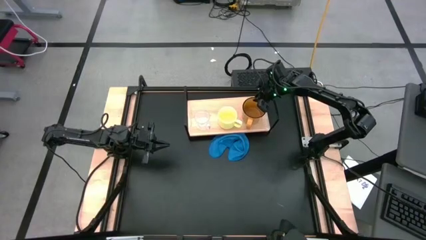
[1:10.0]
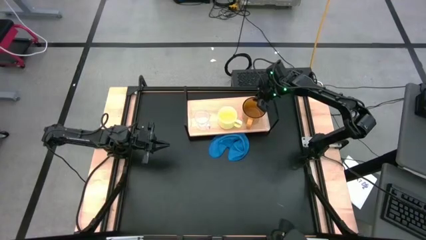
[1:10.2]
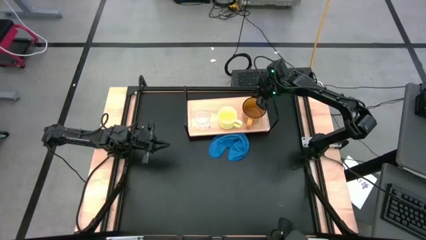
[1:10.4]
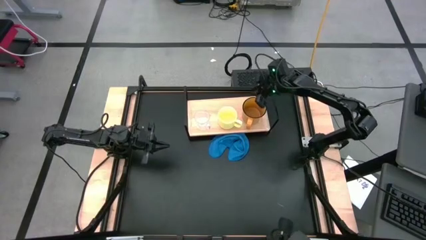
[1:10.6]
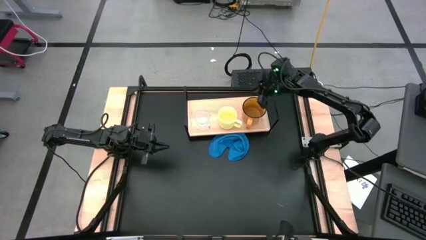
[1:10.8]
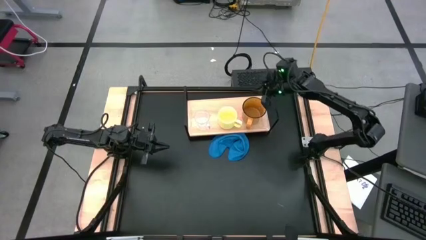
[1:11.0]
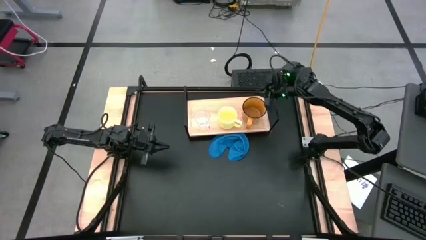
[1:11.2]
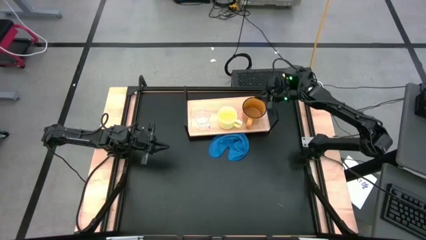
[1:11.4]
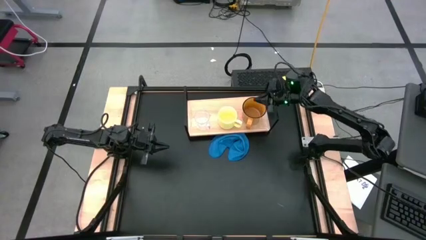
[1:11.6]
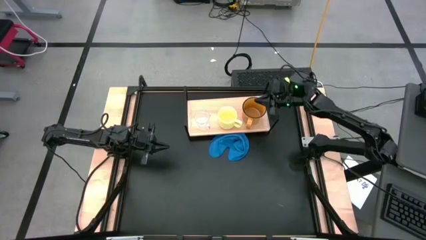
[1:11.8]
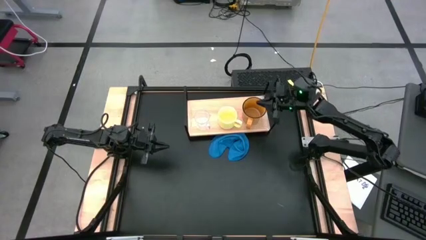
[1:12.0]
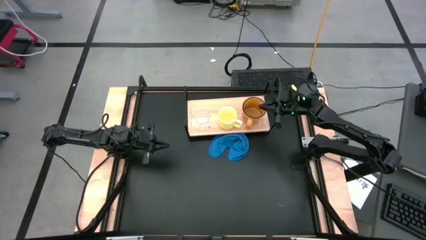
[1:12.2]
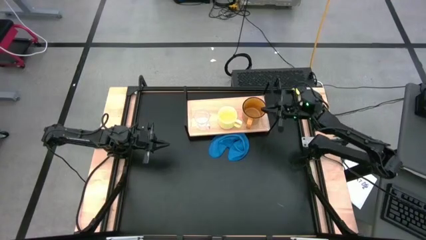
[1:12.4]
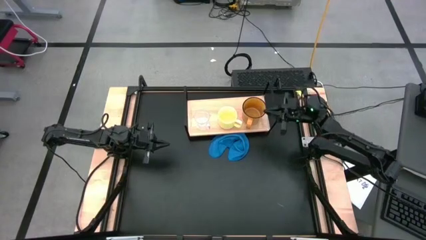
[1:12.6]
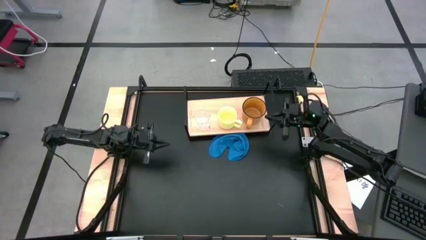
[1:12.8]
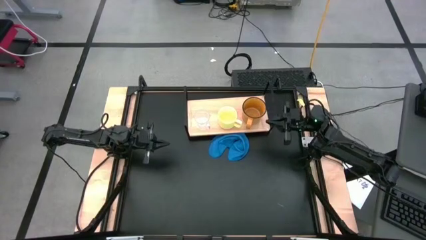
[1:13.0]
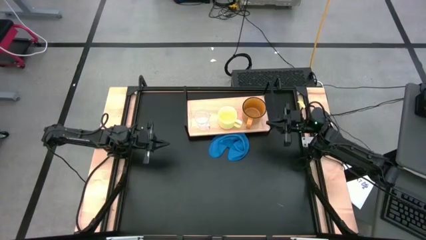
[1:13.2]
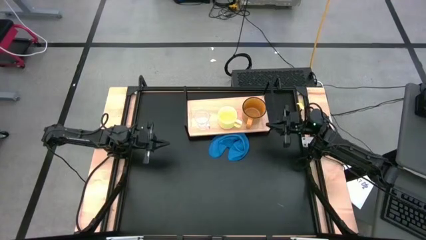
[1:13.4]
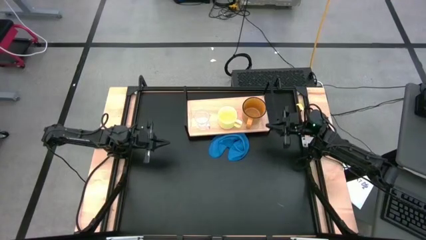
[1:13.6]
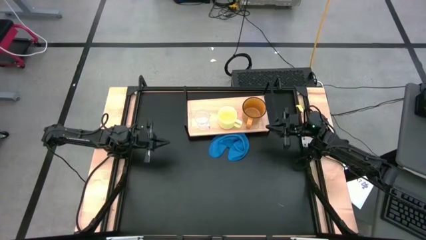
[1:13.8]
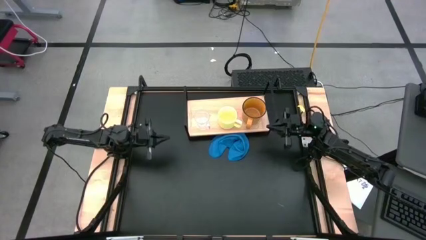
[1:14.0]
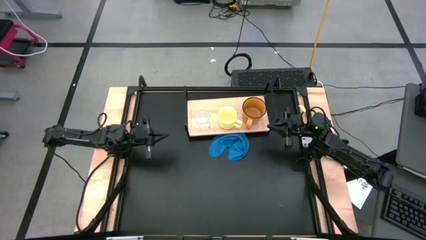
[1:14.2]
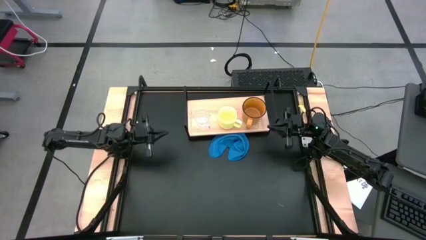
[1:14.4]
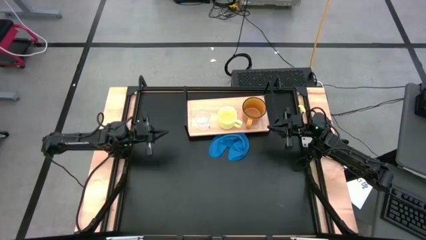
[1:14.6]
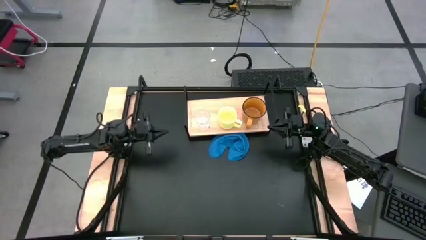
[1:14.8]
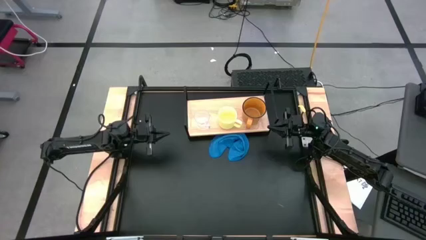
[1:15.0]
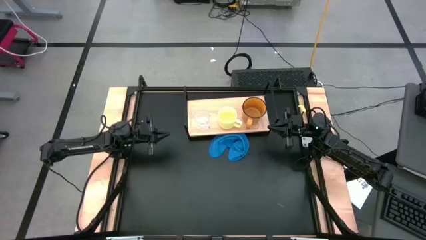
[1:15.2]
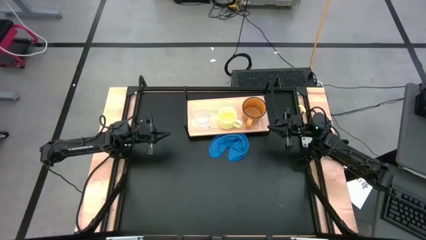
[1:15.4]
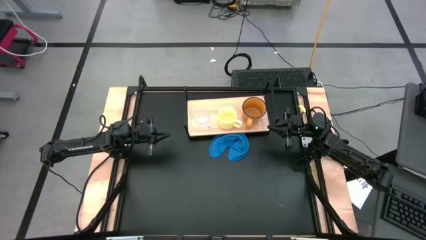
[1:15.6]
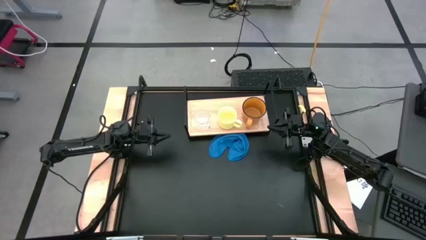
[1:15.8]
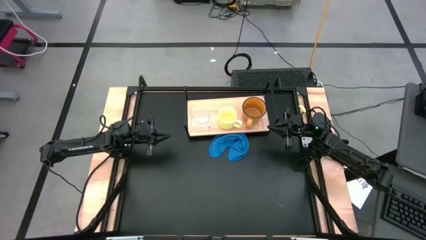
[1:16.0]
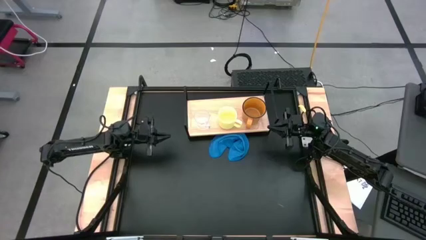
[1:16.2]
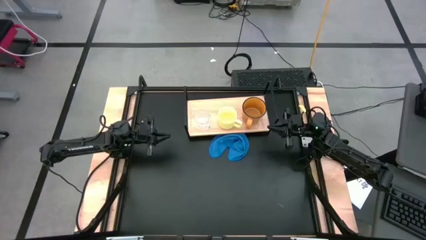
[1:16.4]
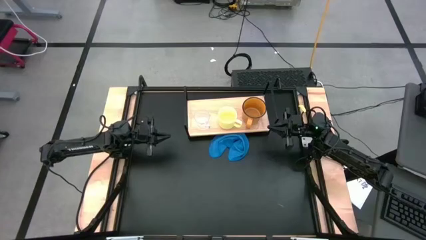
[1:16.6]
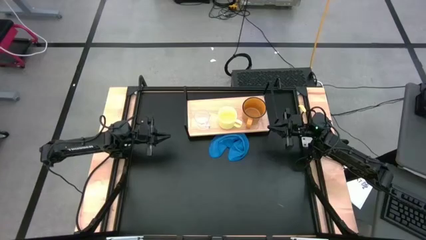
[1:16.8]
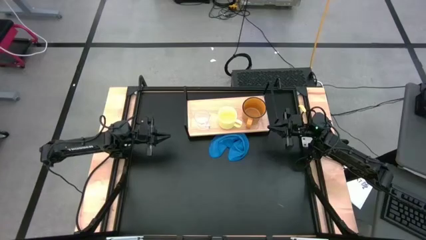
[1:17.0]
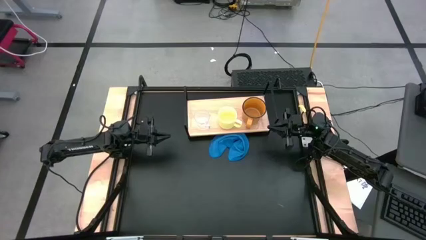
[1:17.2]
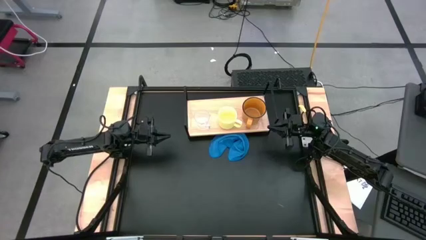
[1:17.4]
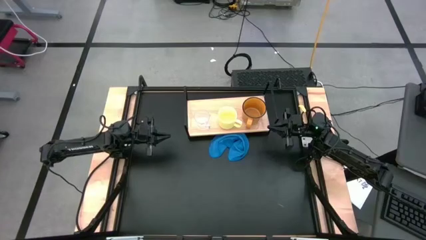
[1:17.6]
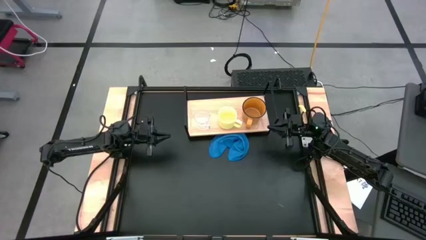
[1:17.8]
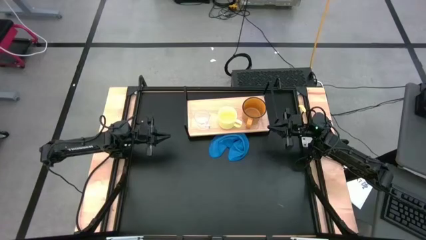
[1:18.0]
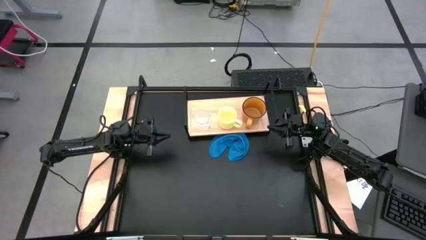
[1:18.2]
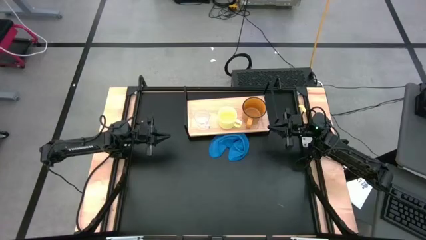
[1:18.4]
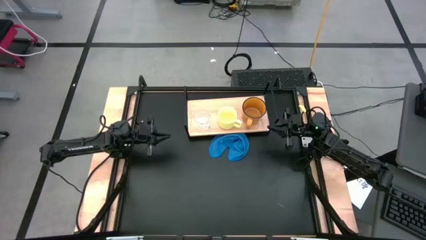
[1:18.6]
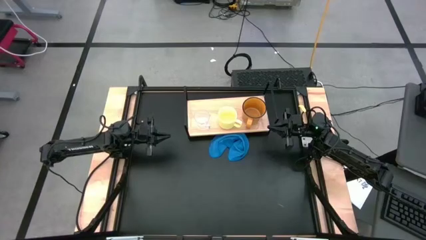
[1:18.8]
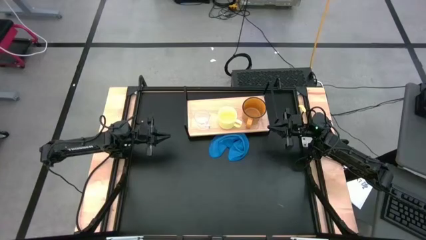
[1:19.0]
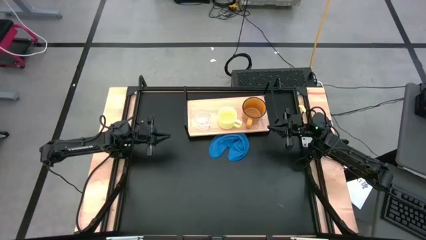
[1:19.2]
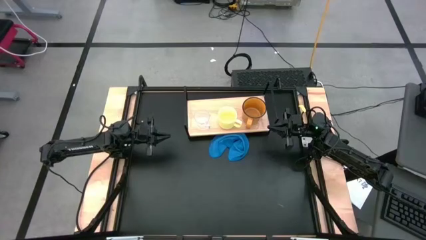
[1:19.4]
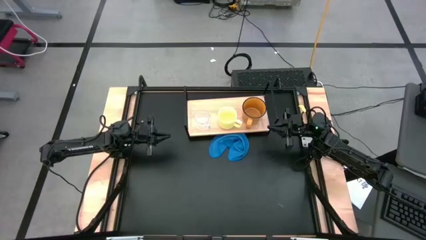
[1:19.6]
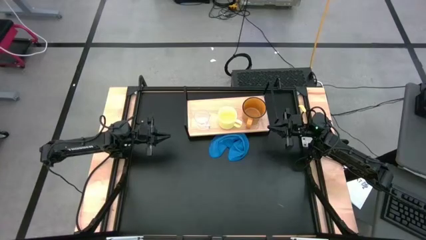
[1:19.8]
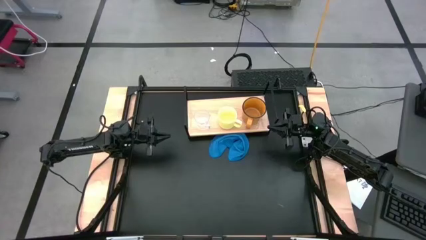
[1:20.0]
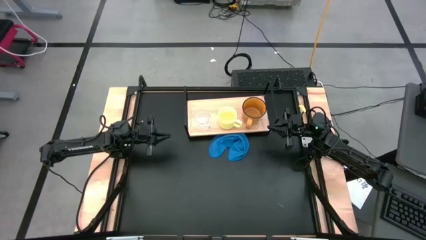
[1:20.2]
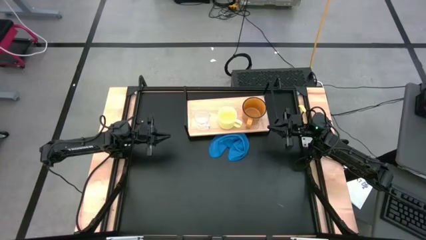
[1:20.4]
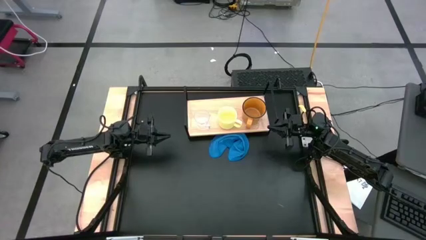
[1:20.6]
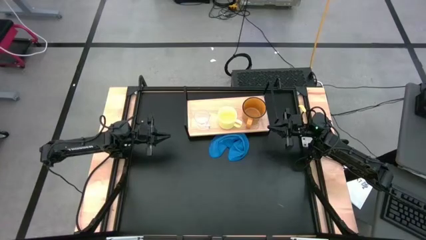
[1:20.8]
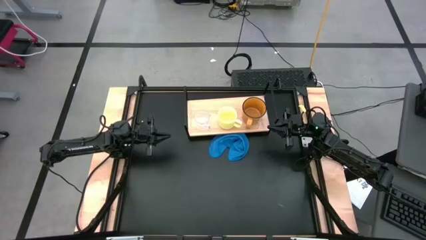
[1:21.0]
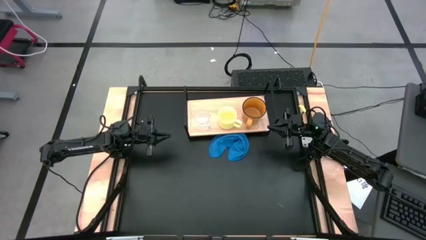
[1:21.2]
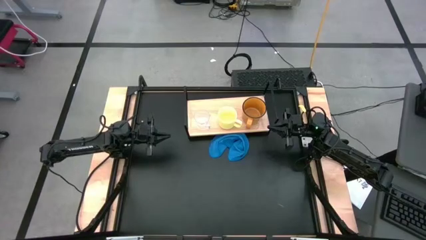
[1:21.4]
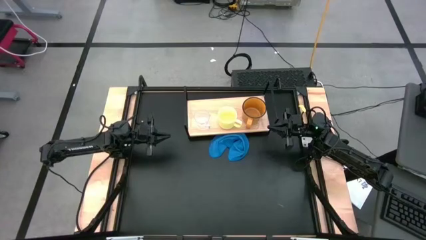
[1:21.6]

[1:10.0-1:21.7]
Task: Stack small to large cups/mugs on shelf
Return to Home Position

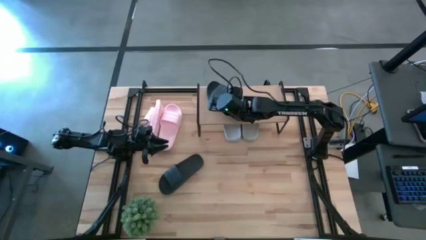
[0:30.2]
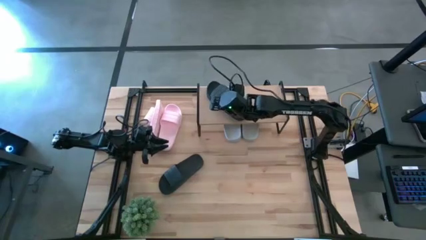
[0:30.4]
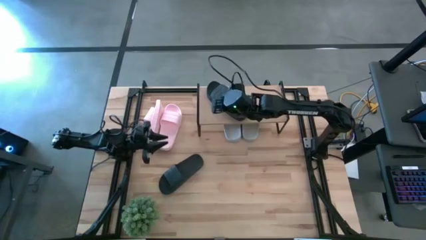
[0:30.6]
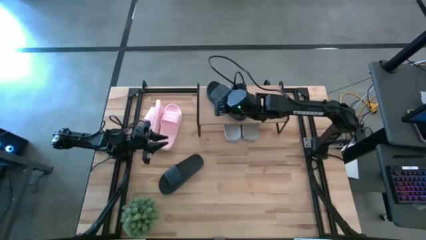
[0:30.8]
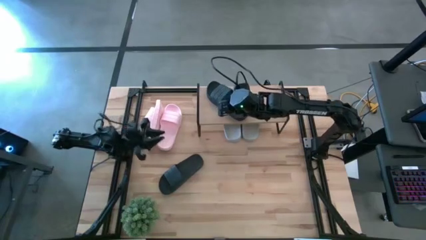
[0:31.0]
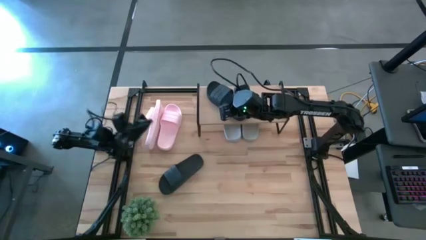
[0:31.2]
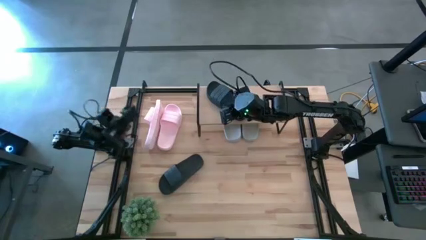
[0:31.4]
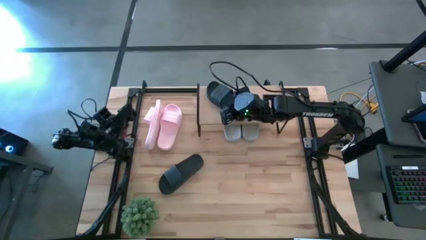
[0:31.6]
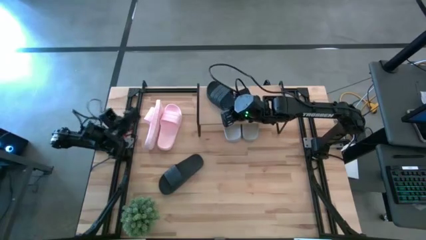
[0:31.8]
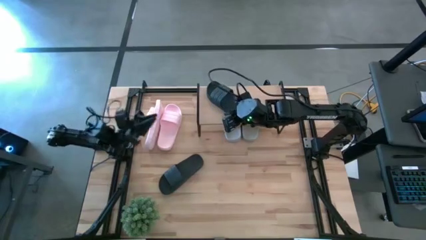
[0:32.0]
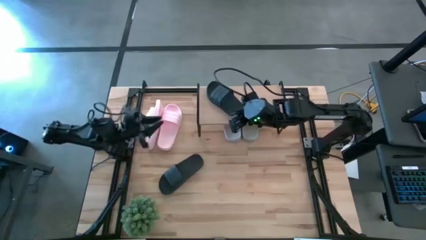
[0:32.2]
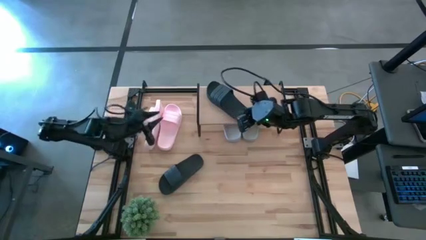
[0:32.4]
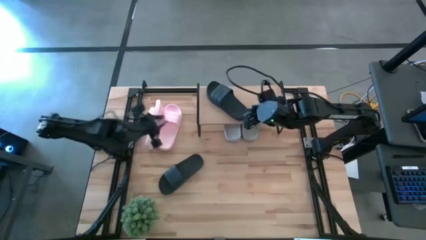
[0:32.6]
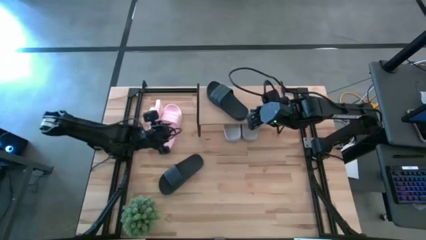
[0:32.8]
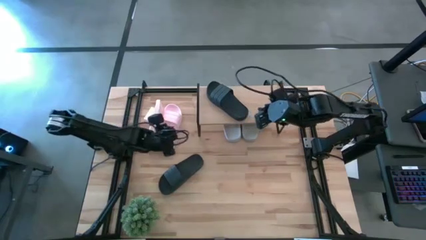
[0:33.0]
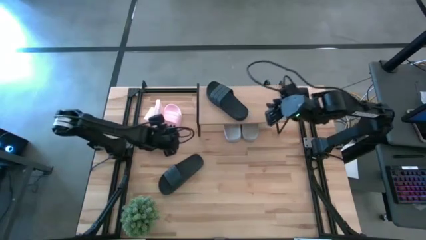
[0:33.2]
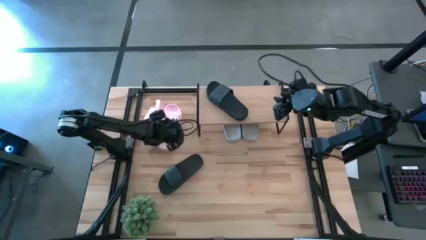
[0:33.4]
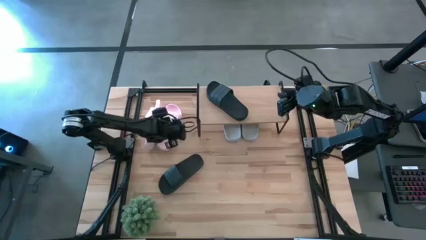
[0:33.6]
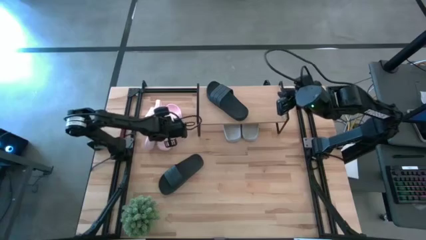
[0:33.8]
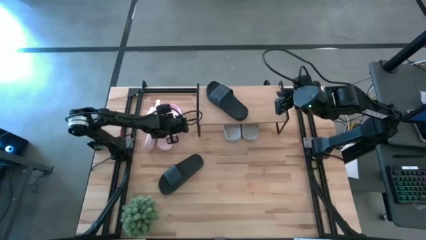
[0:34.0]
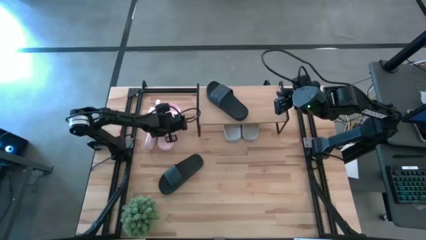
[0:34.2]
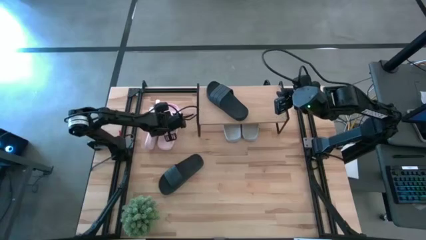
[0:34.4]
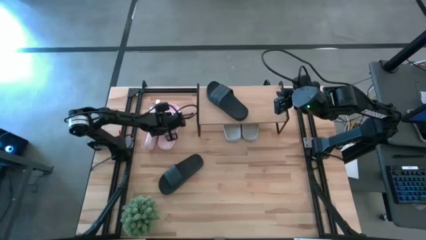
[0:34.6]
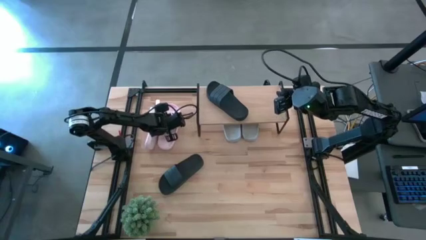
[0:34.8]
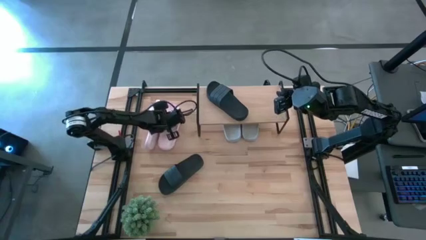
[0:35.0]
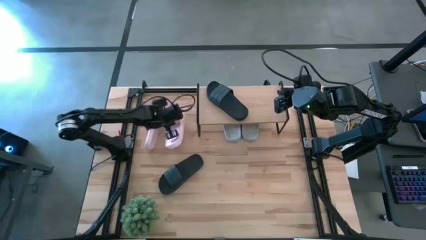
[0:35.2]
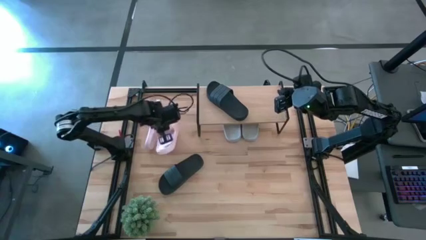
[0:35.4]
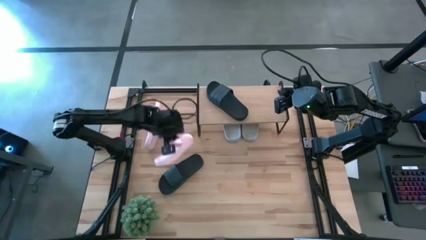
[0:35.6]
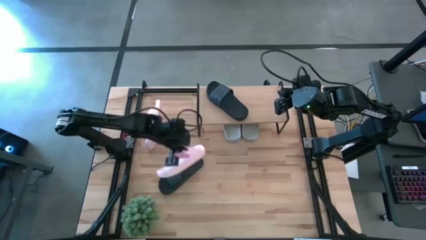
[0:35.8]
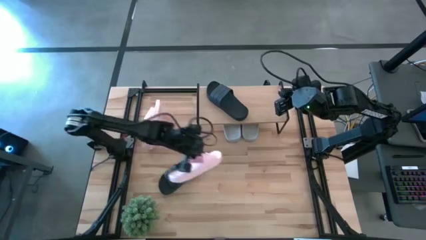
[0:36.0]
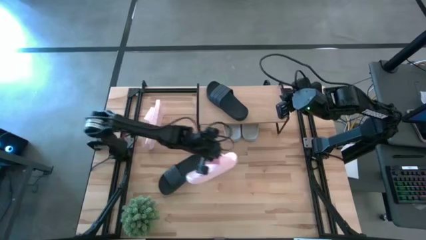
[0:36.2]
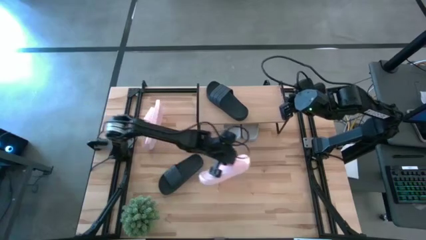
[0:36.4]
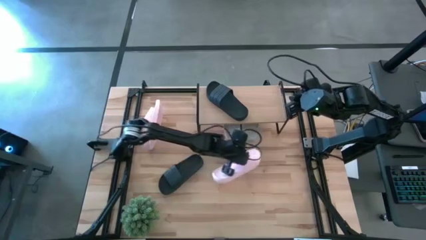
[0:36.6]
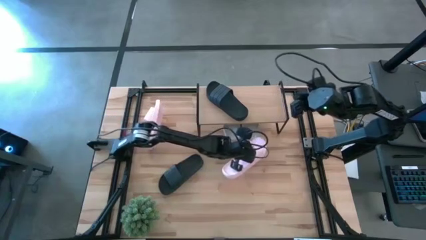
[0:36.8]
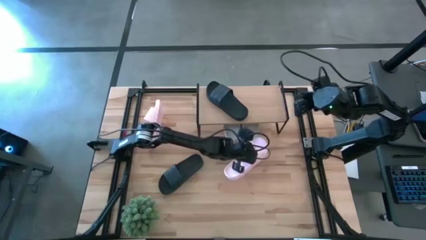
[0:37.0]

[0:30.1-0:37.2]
Task: Pick and place slides into the shelf
Move the right pink slide to the center of the table
